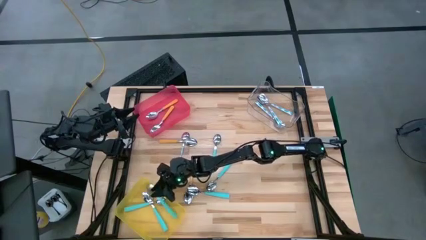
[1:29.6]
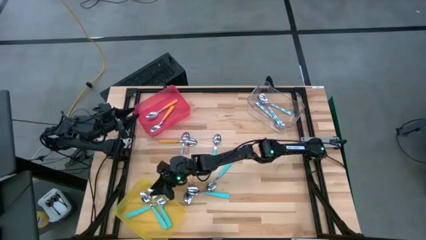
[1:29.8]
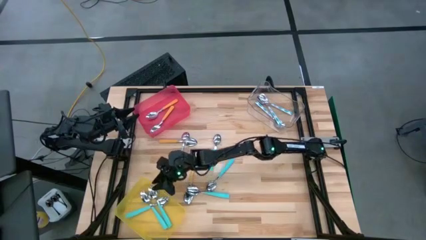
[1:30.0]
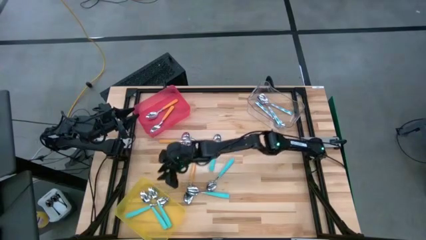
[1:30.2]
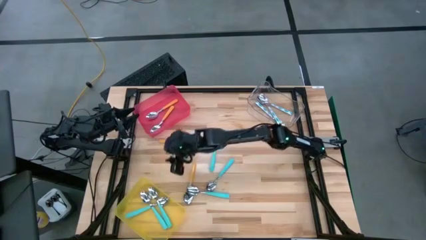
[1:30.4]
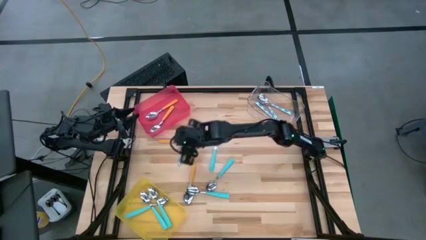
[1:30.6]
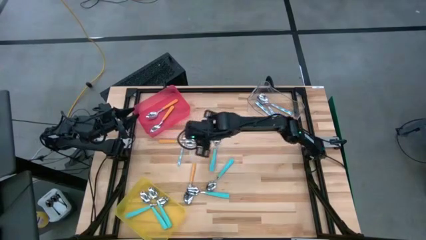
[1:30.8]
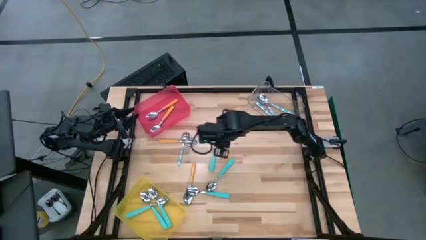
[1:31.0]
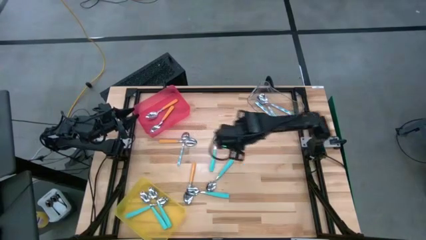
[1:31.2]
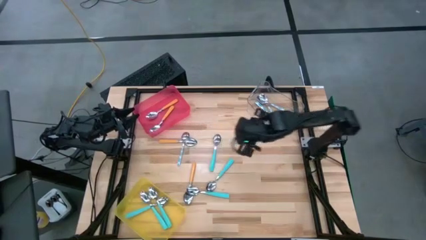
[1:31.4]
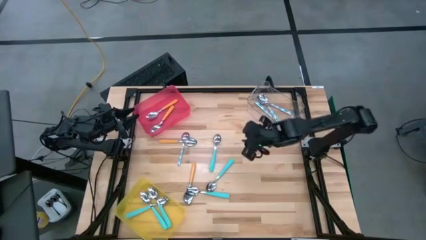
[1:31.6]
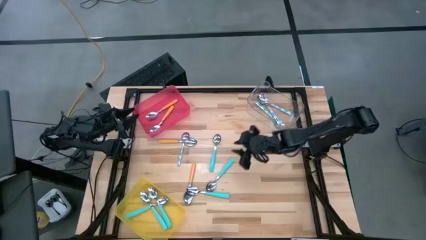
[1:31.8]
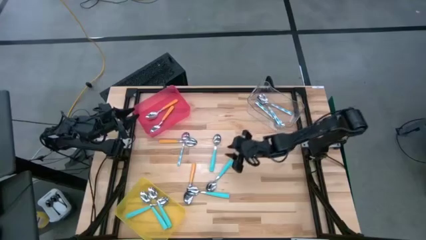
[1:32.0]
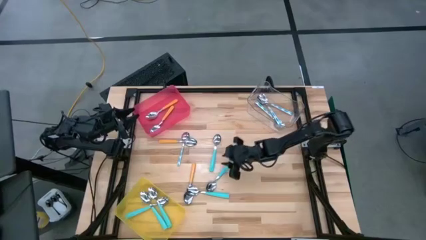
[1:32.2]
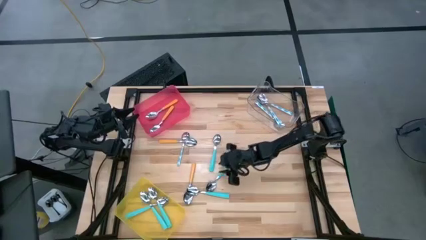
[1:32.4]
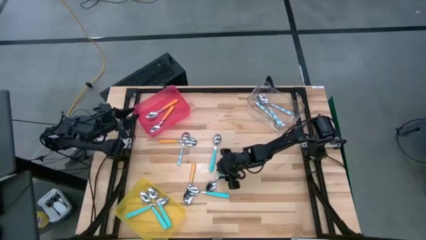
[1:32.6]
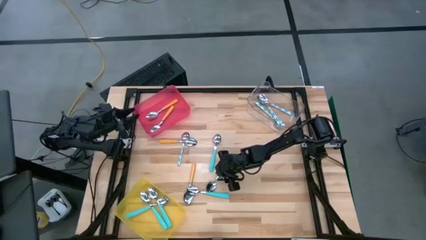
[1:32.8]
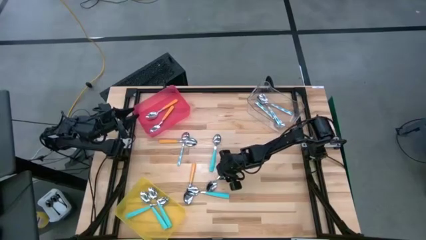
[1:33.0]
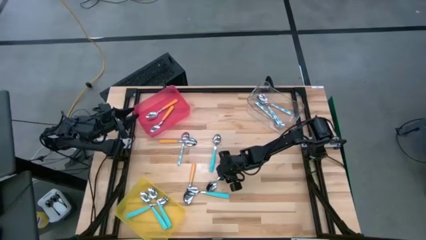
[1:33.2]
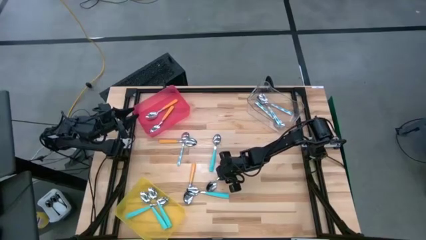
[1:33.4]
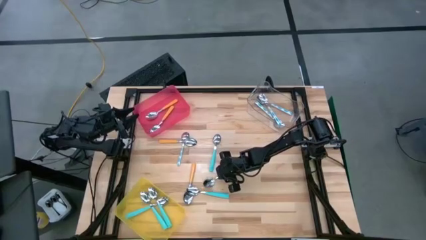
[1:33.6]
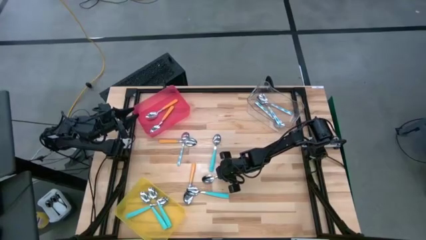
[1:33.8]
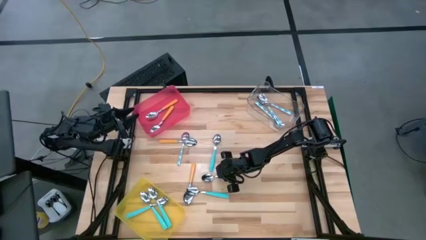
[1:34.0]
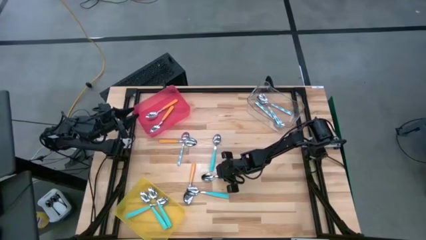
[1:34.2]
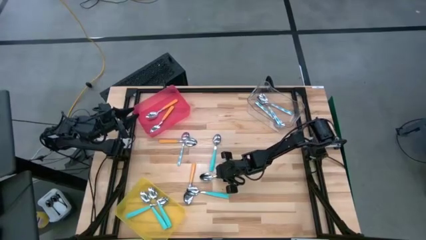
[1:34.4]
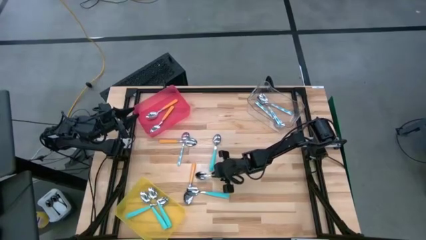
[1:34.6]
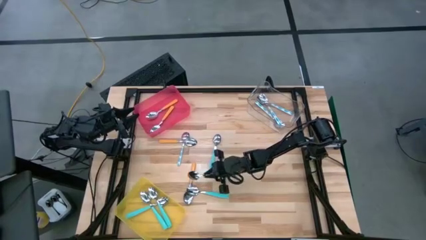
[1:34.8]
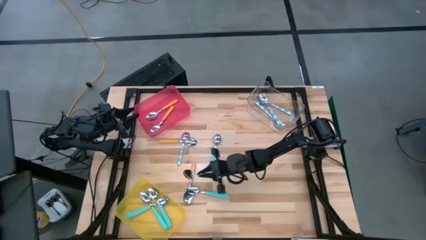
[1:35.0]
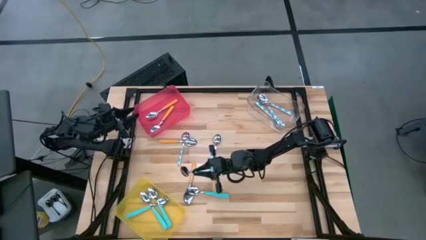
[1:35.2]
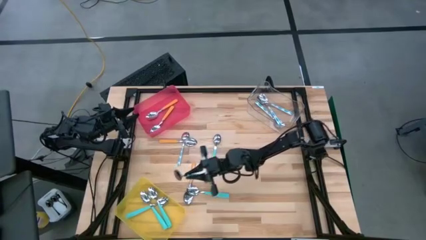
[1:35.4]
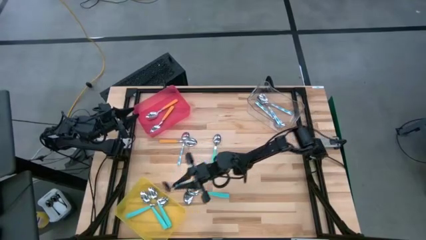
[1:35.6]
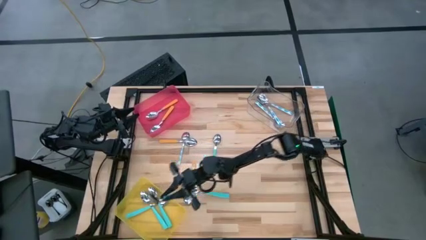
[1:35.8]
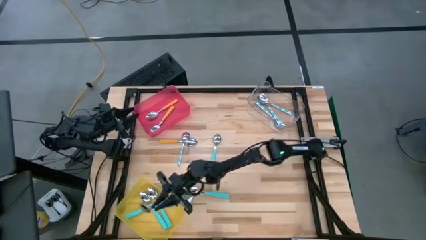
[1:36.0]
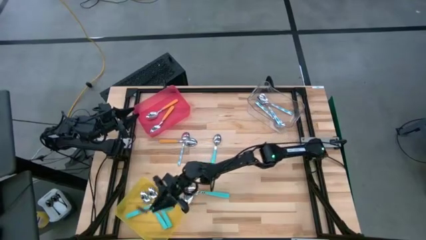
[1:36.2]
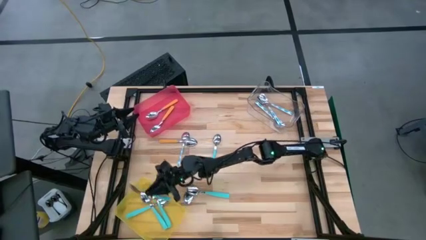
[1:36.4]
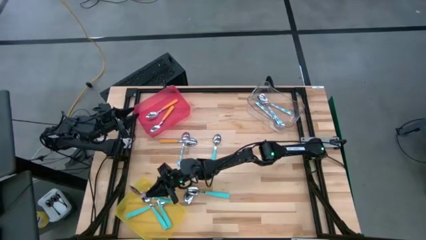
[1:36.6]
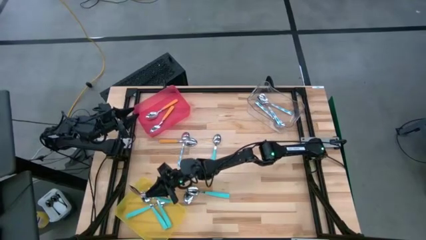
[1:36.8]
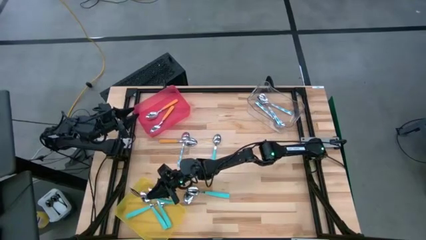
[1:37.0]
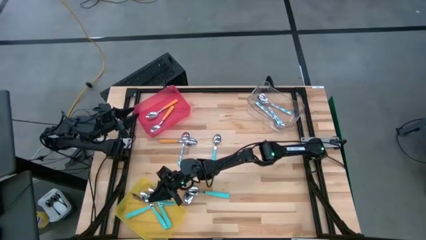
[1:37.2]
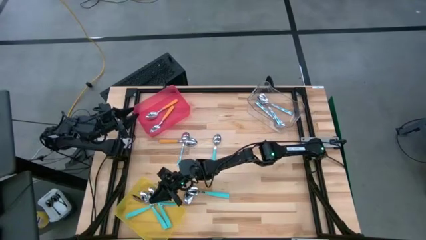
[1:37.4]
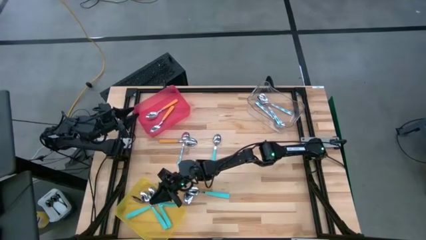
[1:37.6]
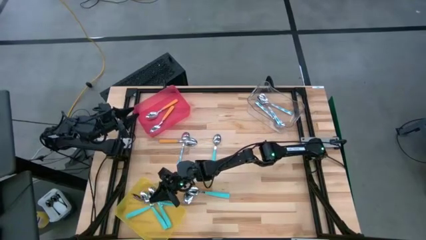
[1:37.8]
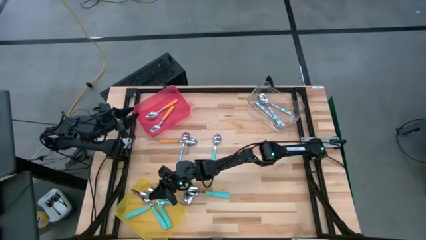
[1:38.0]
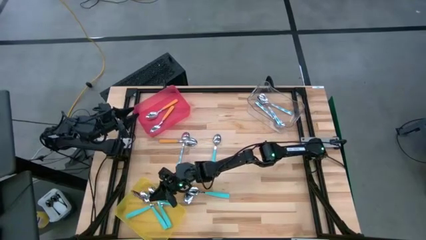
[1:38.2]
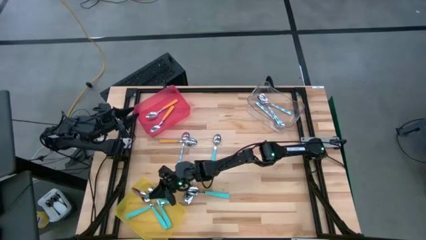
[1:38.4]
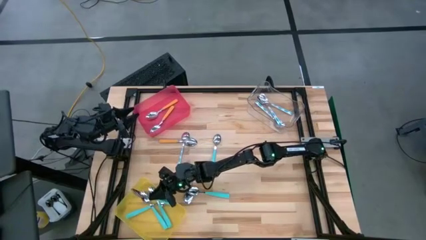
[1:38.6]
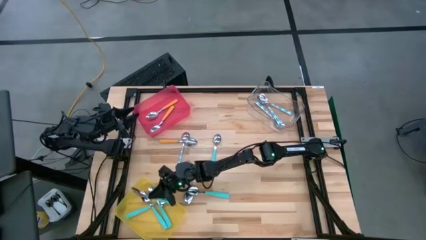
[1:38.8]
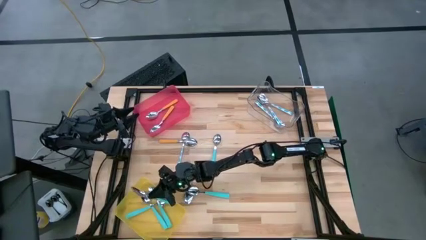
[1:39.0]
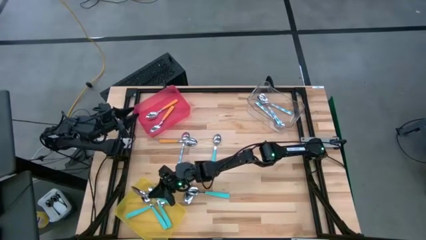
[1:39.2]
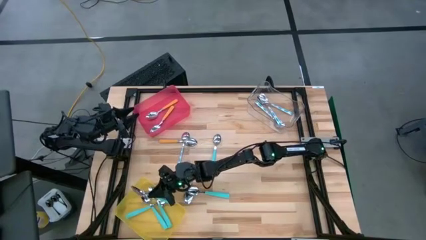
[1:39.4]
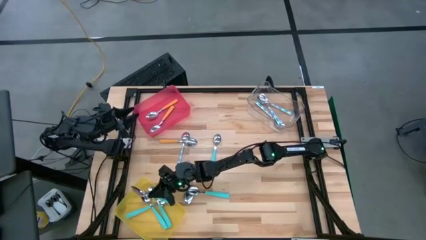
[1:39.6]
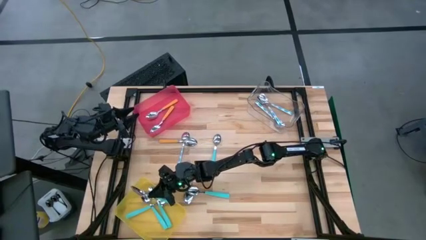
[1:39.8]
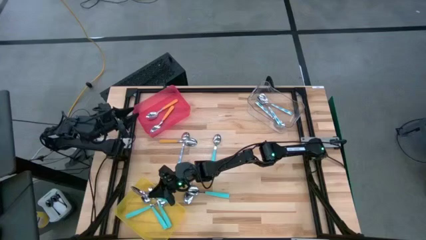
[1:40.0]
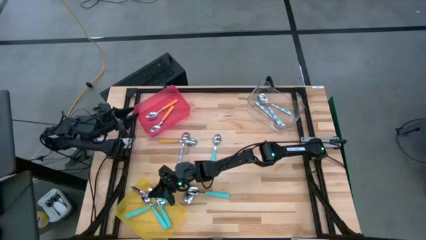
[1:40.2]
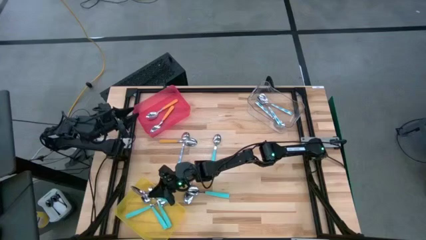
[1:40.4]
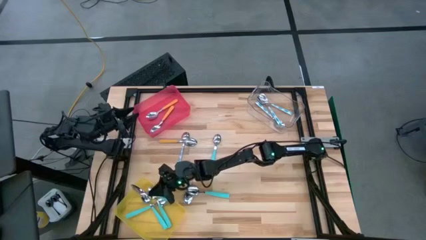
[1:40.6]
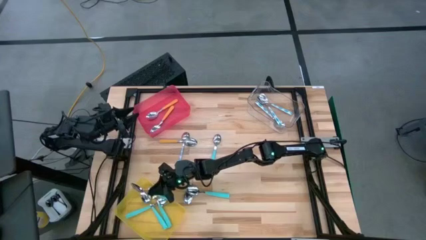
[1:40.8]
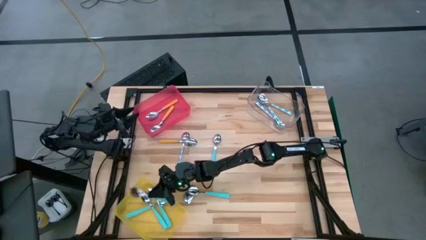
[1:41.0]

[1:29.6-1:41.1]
Task: Sort silverware by color (type)
Put the light blue spoon into the yellow bin

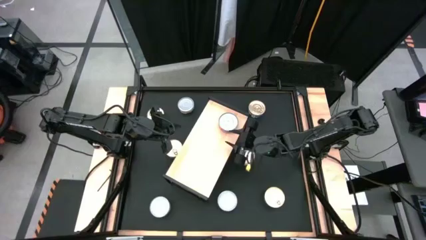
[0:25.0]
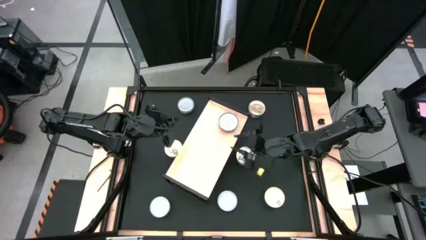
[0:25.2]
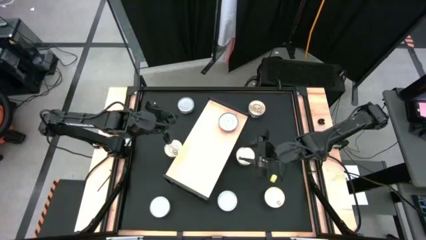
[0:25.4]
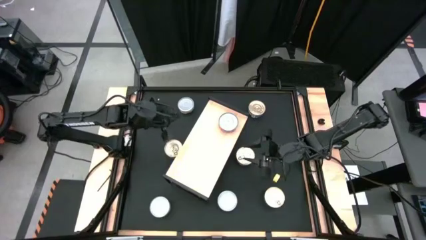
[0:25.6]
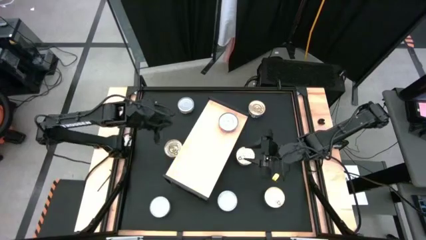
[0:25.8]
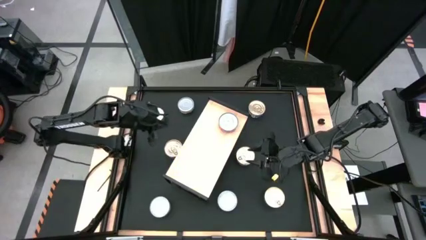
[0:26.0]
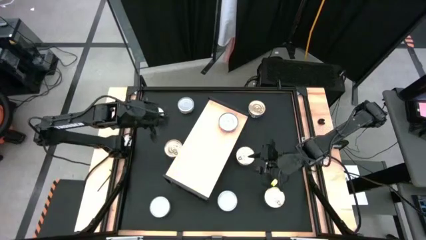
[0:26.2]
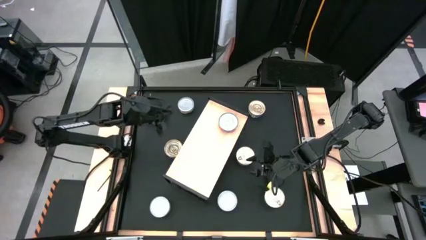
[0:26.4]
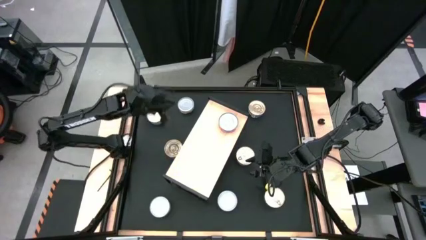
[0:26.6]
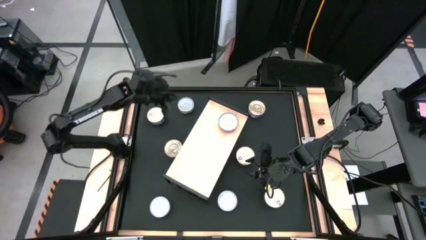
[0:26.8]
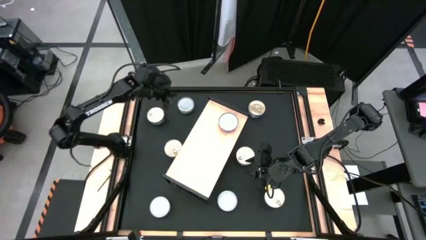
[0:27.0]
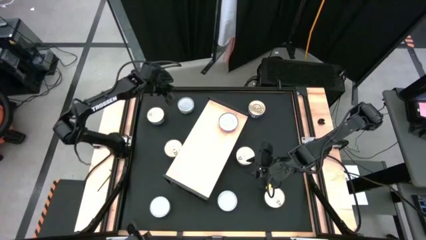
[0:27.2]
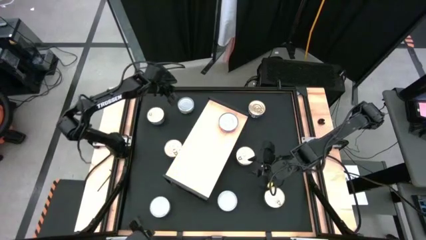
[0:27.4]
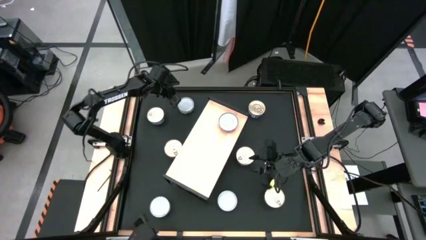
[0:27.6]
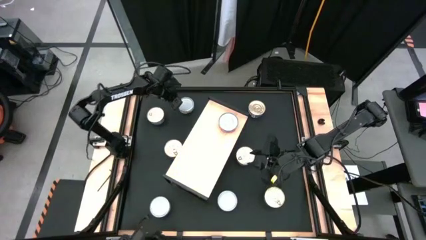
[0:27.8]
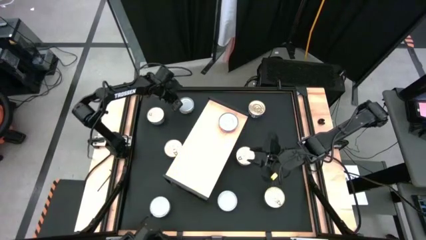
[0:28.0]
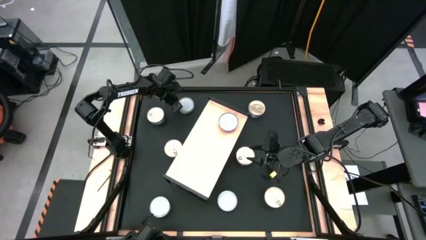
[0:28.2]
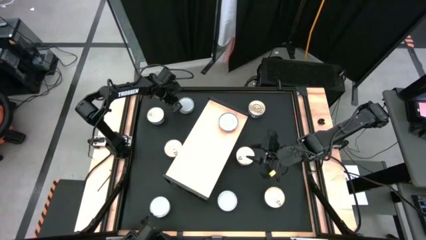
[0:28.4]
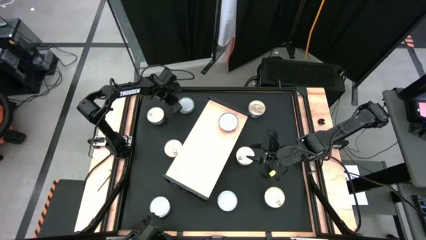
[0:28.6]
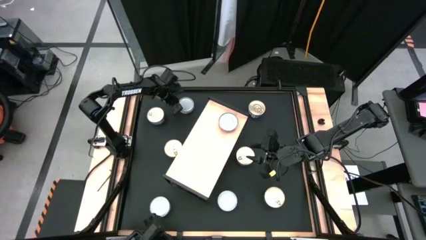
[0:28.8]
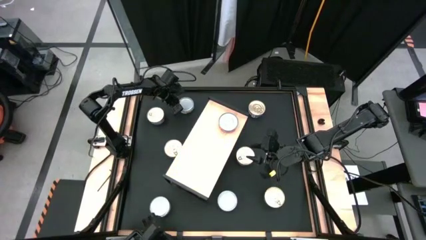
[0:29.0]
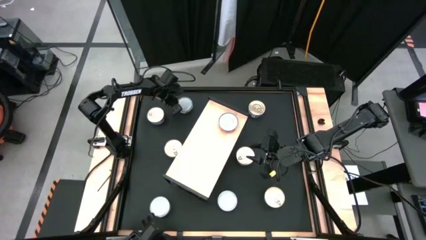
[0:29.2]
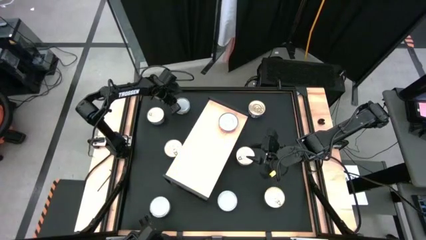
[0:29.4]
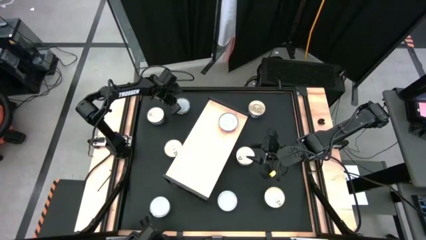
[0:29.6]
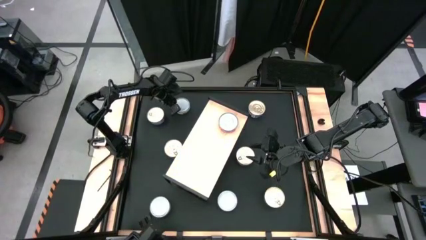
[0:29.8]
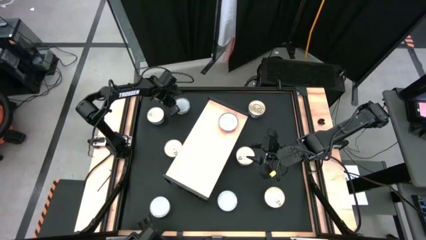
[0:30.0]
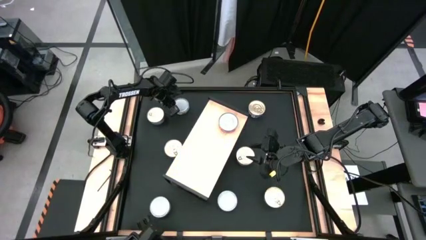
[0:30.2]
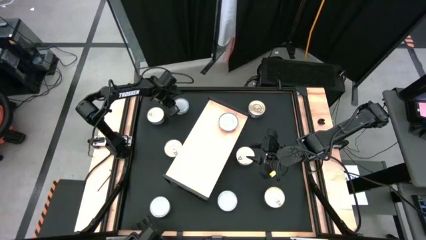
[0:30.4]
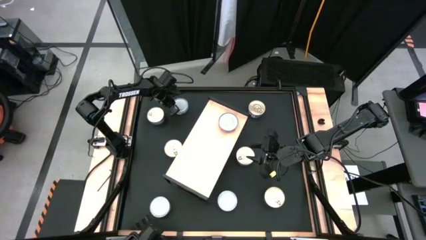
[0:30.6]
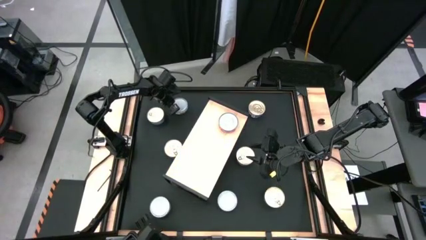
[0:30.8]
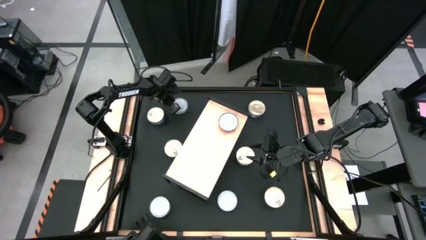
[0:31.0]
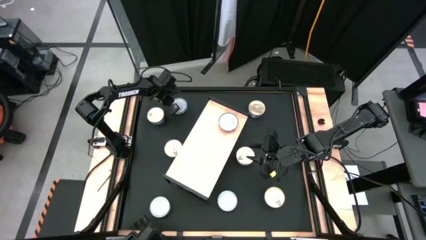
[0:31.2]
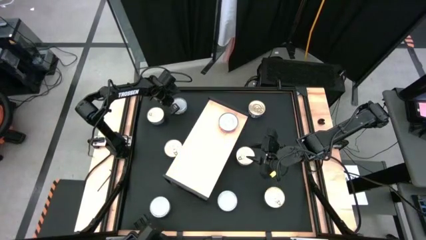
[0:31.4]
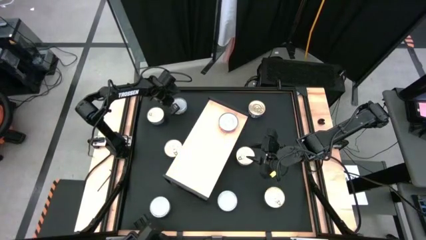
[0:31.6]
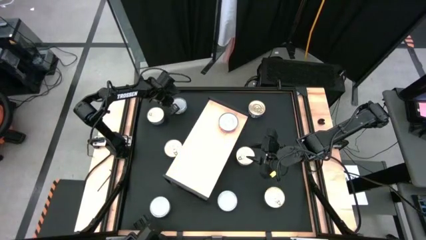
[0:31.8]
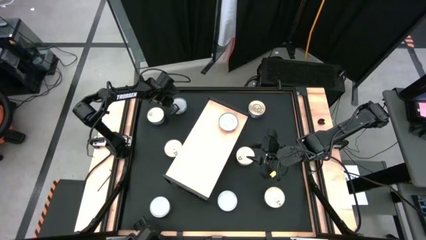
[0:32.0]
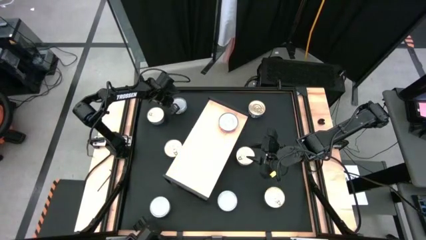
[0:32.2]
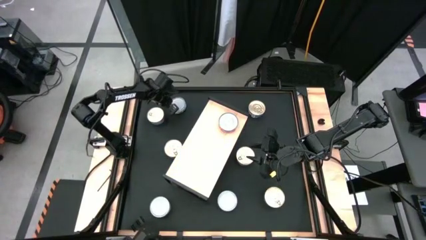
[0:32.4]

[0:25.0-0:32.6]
Task: Stack canned seafood by type on shelf
Put the green tuna can on the shelf
